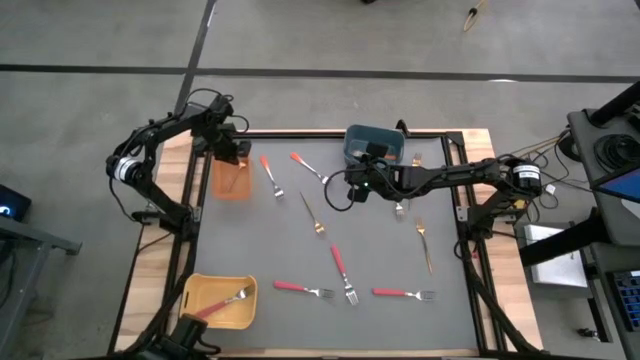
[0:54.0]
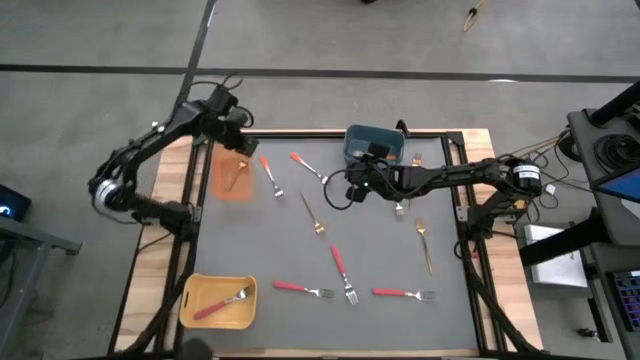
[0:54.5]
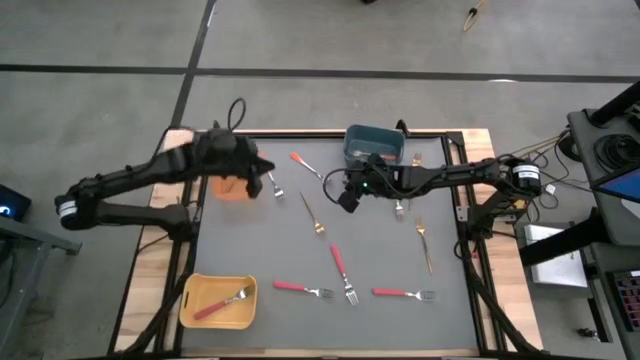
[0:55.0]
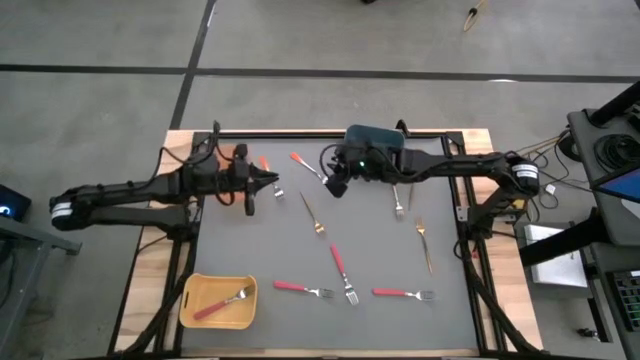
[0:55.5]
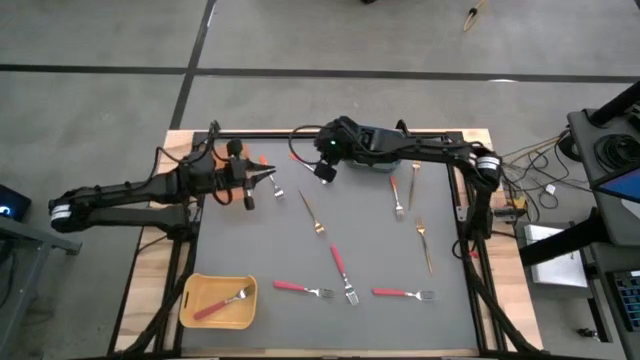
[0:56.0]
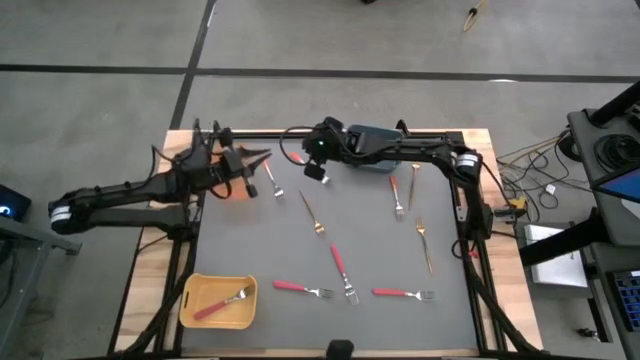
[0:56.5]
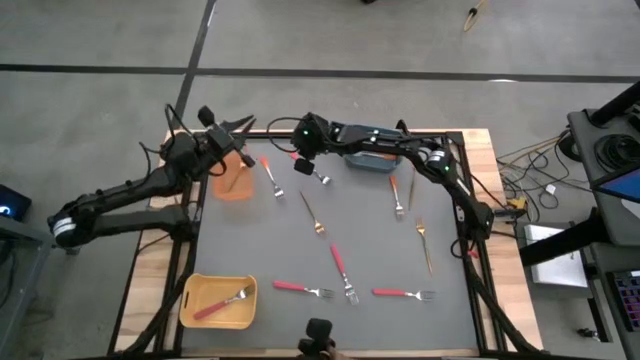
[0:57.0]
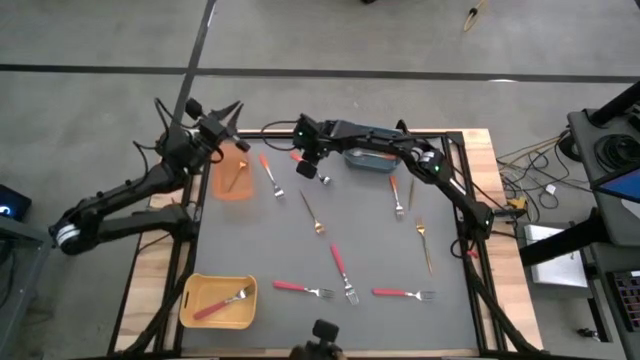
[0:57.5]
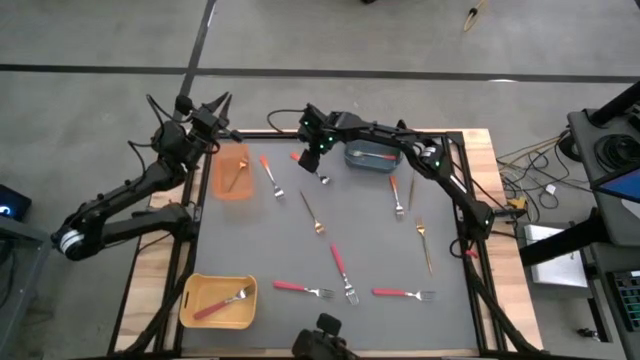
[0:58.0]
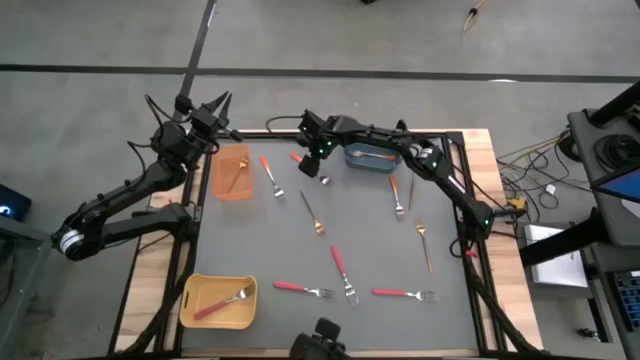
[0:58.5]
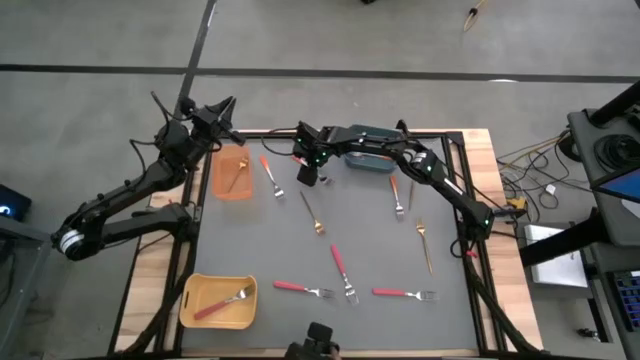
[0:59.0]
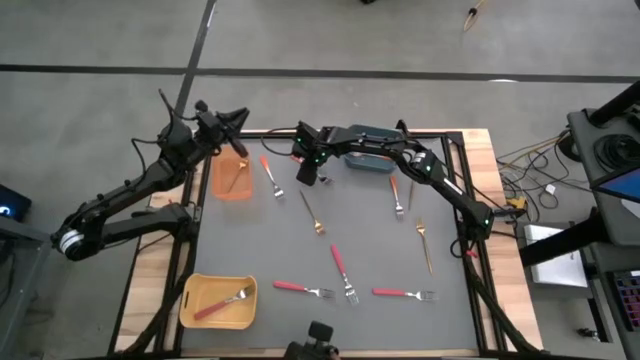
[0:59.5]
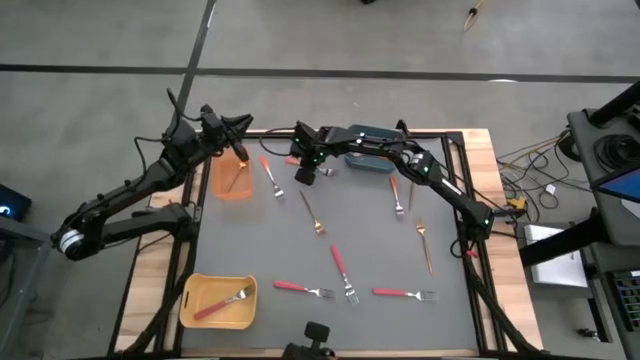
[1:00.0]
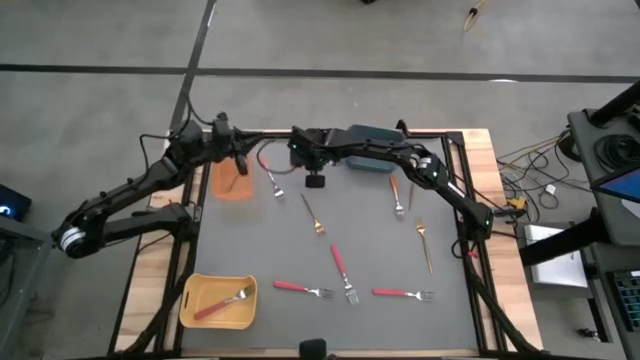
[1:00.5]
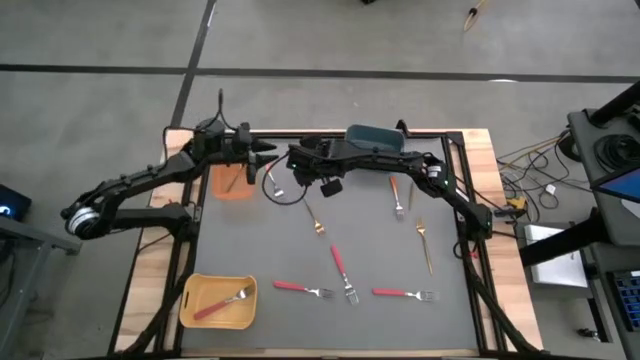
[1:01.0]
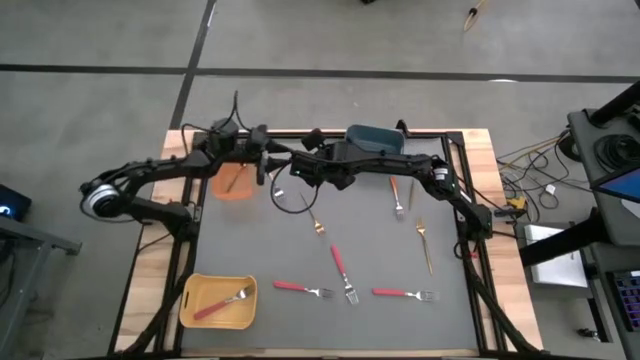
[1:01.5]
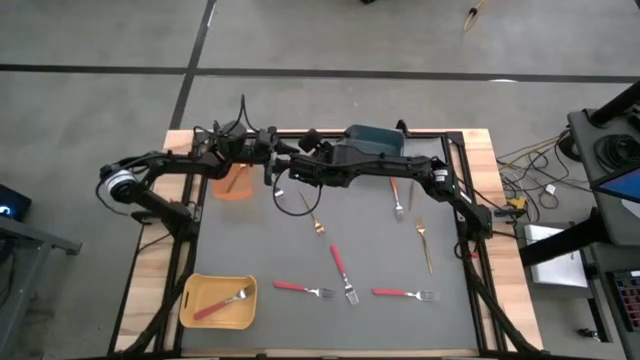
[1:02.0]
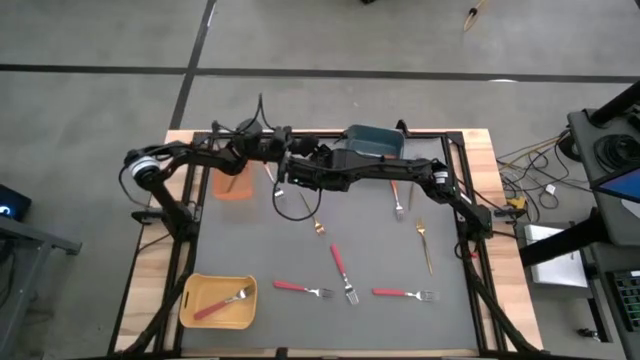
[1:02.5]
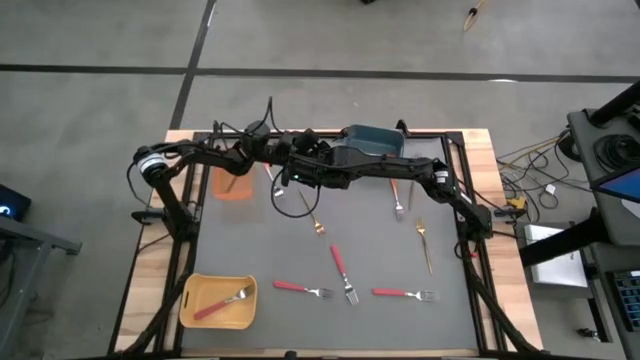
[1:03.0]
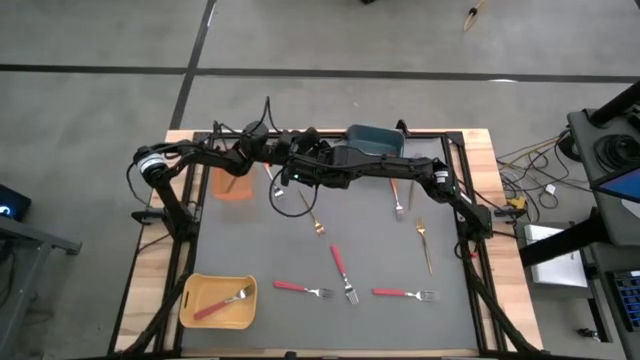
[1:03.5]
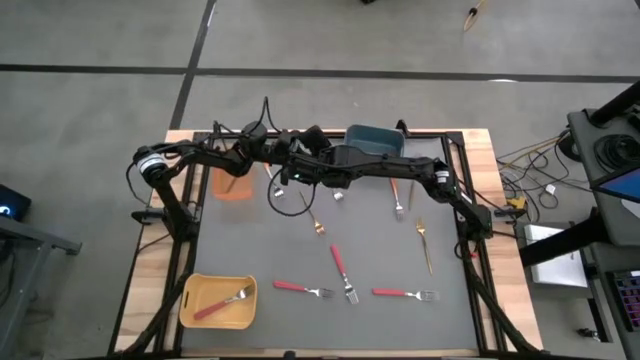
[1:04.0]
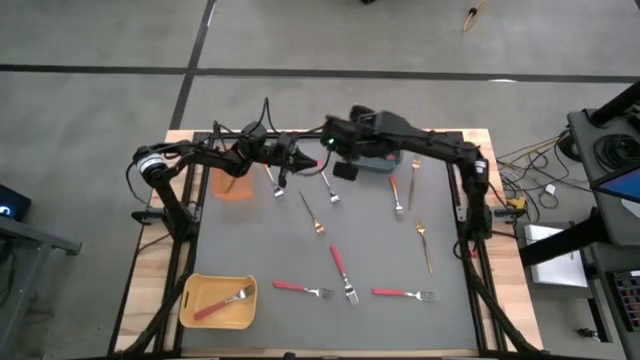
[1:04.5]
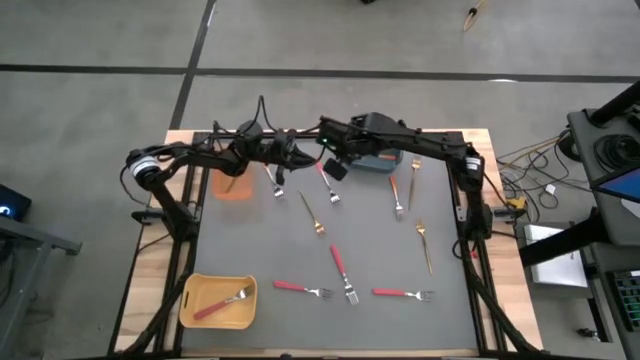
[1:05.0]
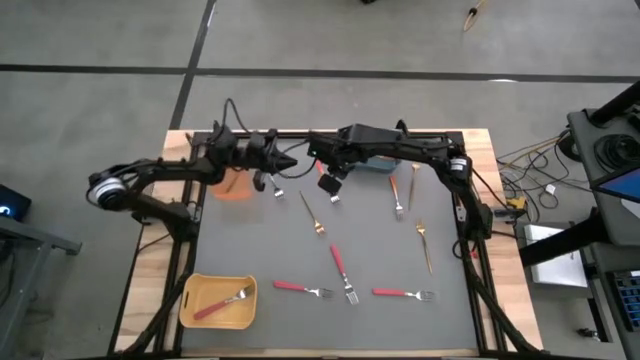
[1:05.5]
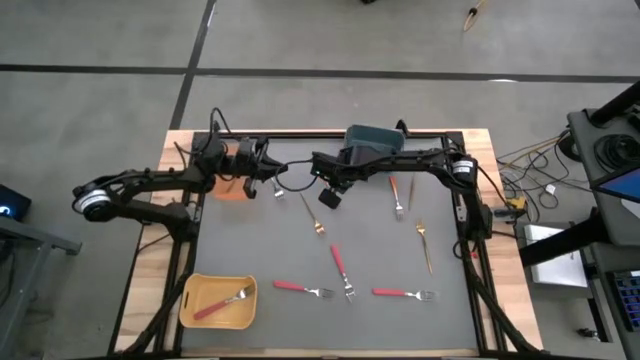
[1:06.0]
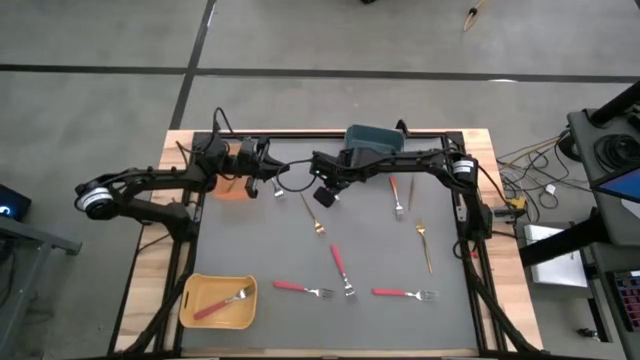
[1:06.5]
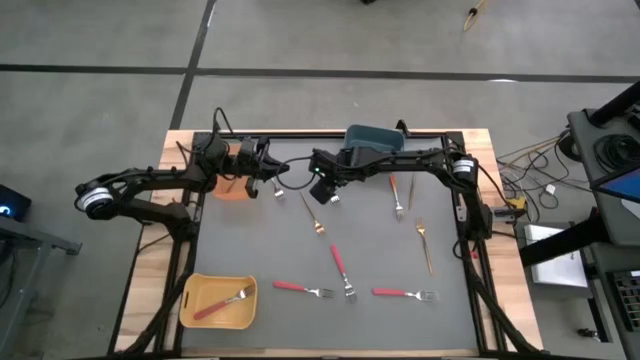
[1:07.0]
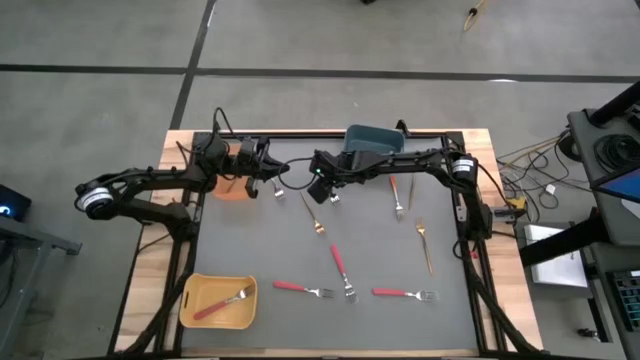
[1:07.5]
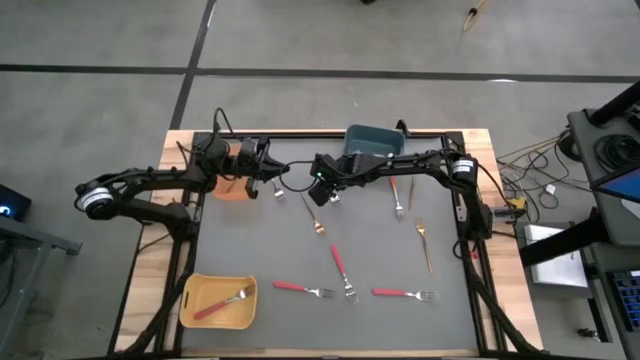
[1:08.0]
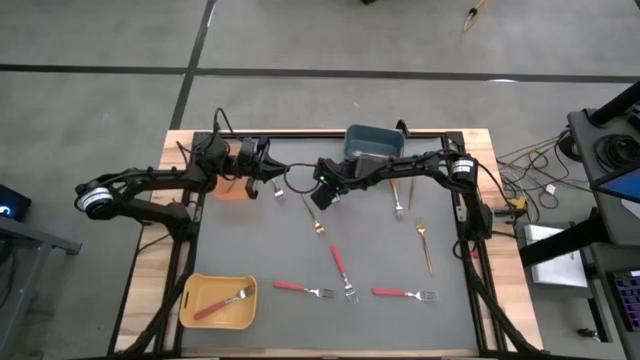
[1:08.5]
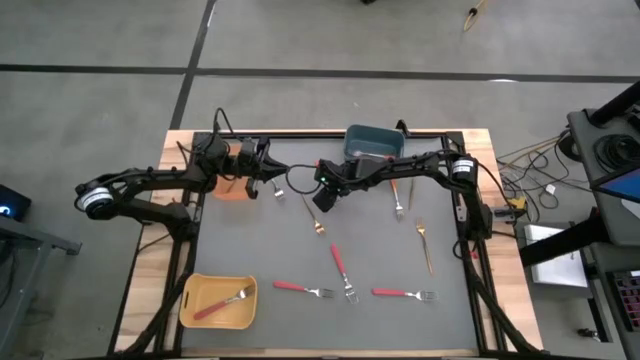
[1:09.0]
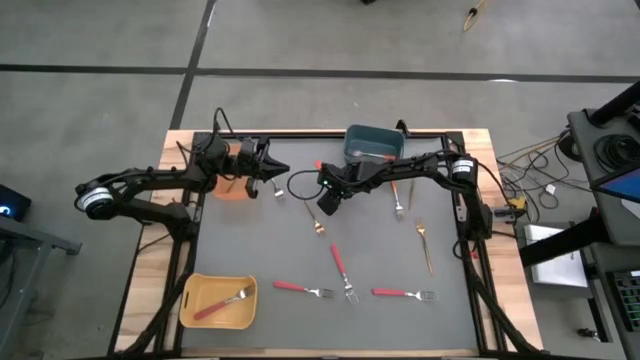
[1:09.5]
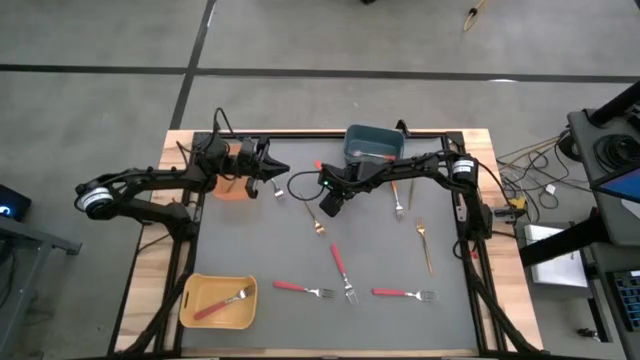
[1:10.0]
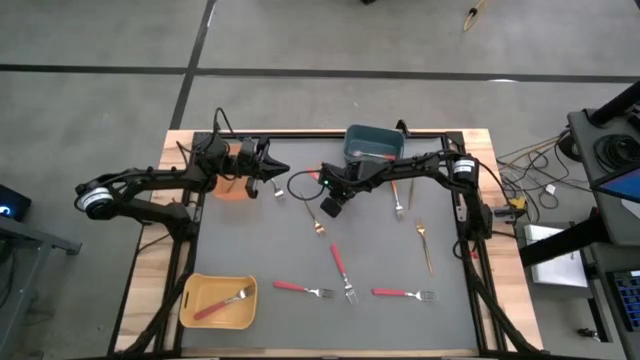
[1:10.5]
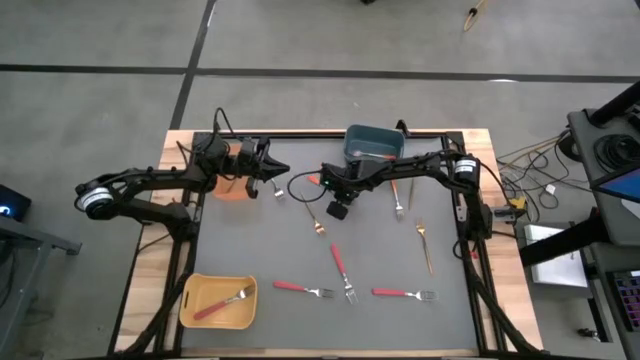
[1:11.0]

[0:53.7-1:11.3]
Task: Sort silverware by color (type)
Put the orange fork into the blue bin

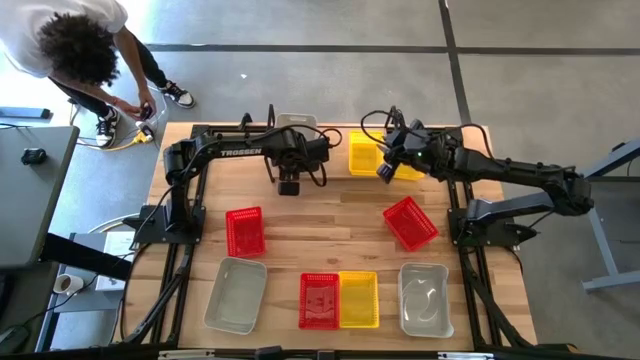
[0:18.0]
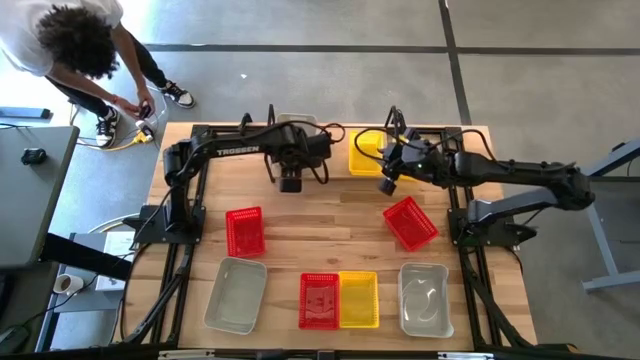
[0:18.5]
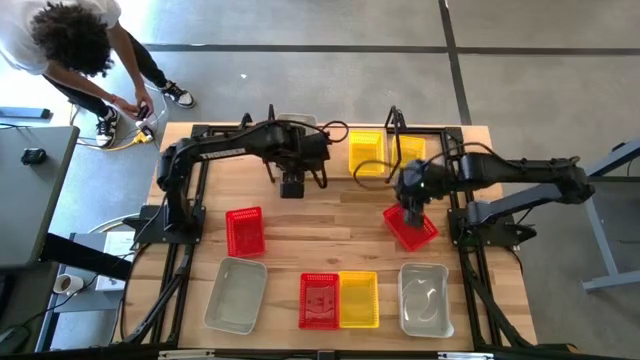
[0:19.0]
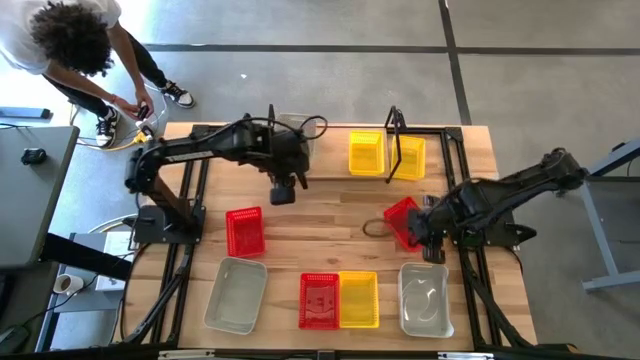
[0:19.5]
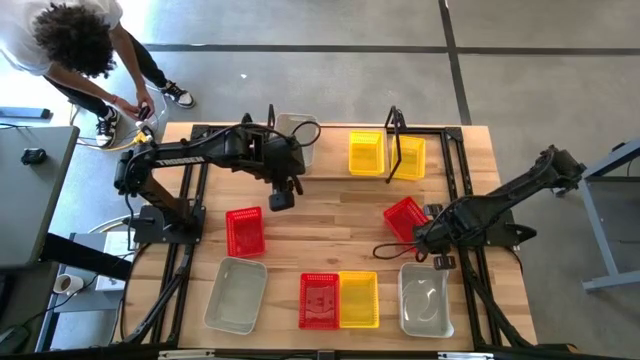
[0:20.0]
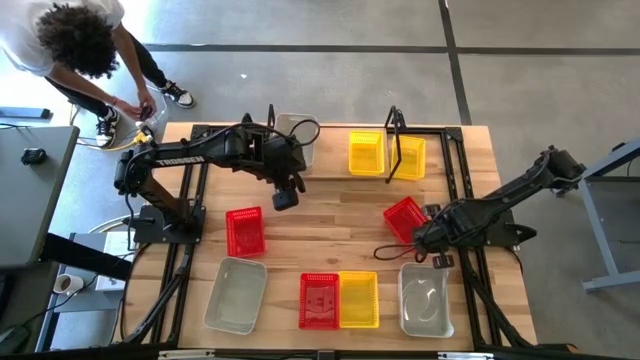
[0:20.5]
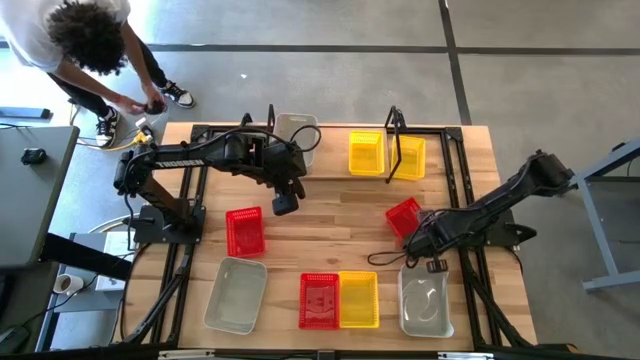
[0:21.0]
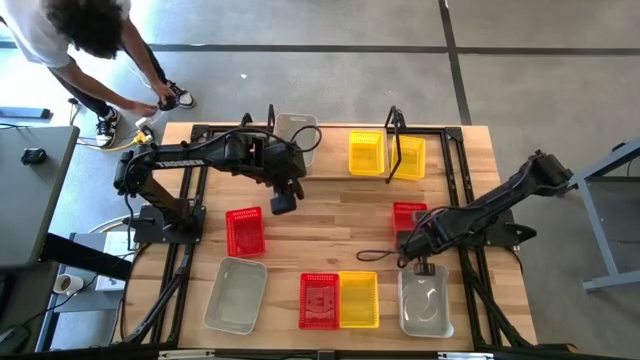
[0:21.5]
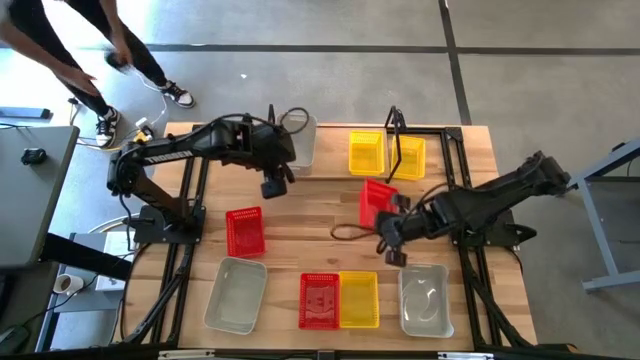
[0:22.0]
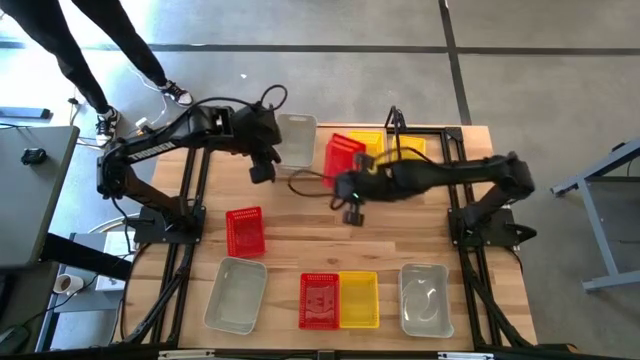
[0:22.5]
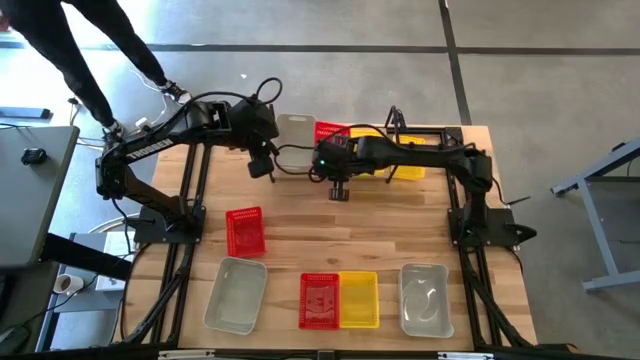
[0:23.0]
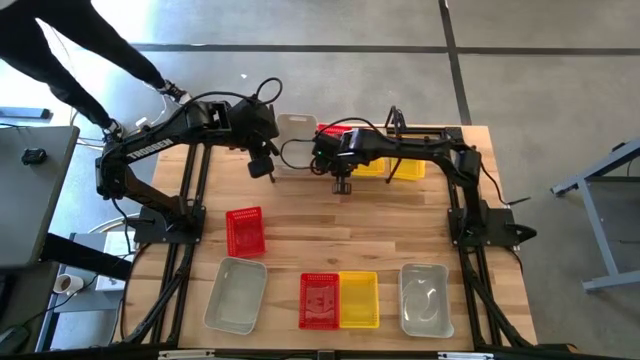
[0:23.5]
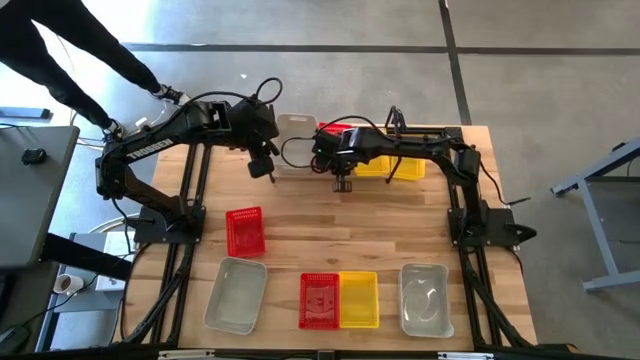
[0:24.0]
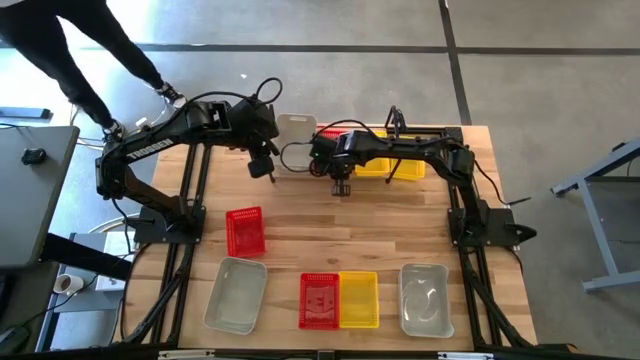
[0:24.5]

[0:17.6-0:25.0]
Task: Stack baskets on shelf by color
Put the top right red bin on the shelf
